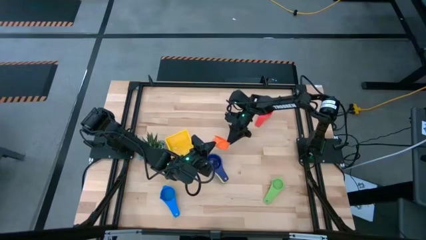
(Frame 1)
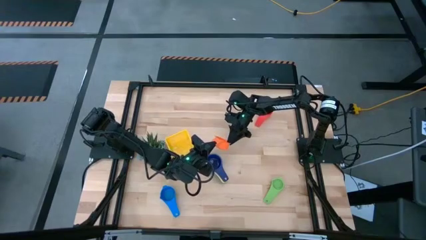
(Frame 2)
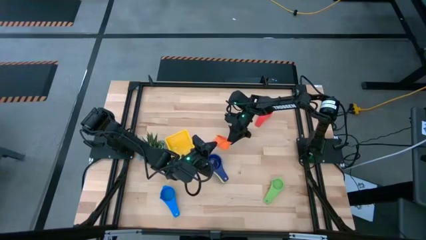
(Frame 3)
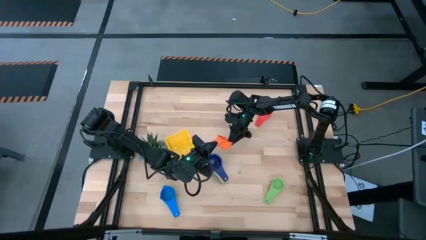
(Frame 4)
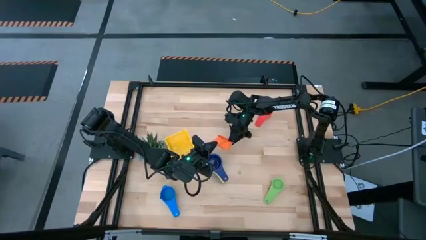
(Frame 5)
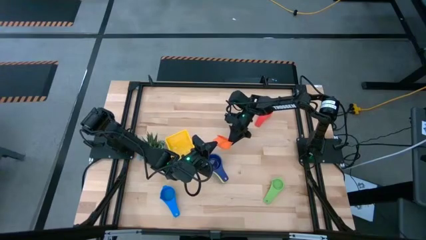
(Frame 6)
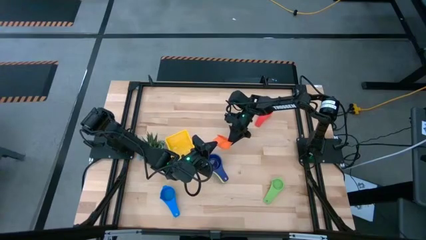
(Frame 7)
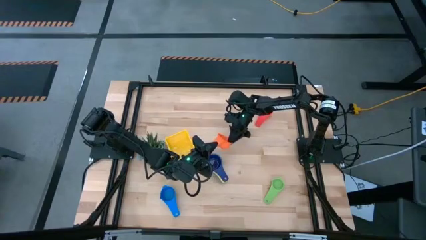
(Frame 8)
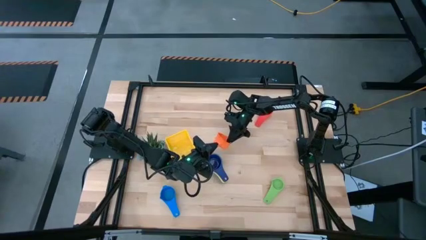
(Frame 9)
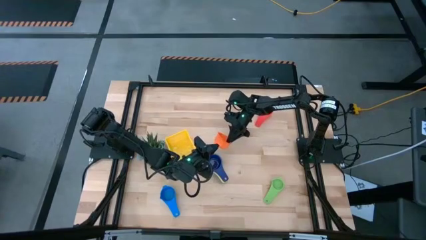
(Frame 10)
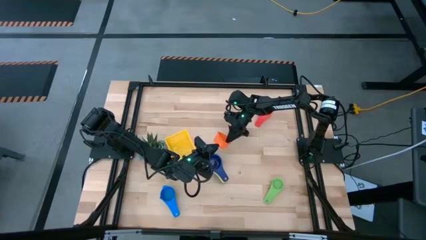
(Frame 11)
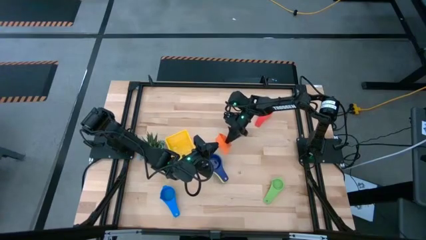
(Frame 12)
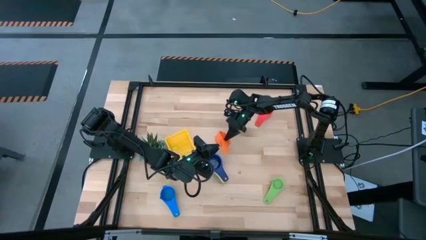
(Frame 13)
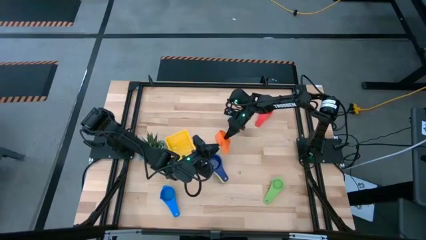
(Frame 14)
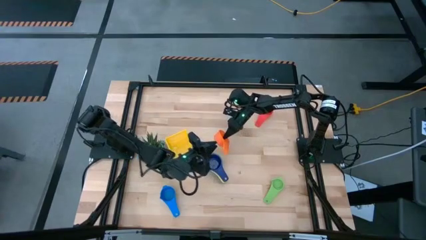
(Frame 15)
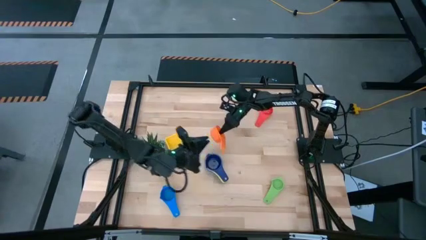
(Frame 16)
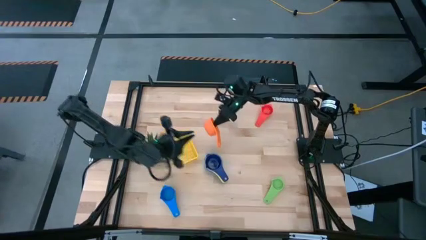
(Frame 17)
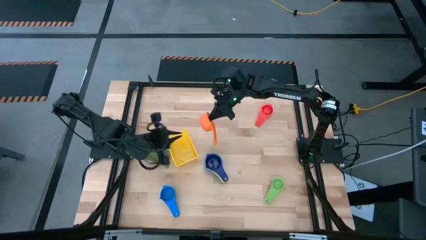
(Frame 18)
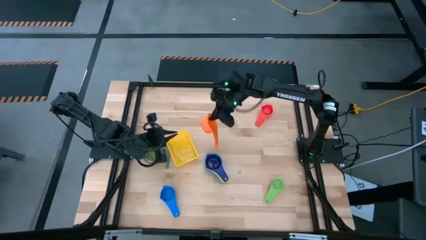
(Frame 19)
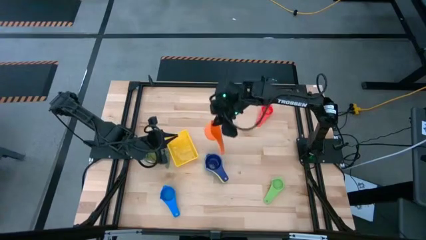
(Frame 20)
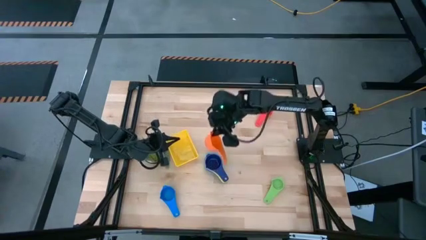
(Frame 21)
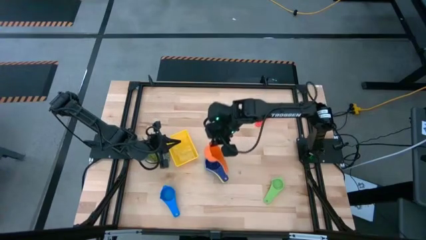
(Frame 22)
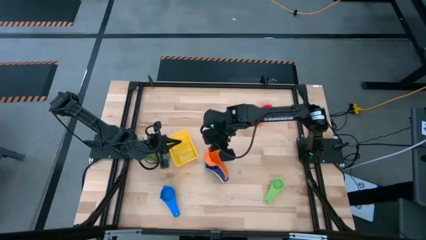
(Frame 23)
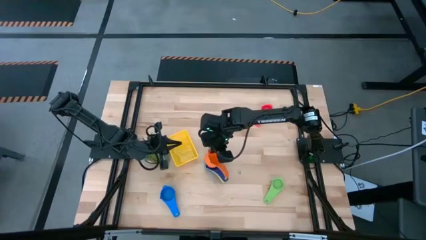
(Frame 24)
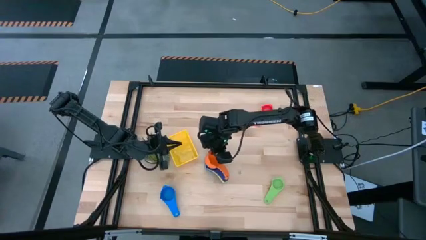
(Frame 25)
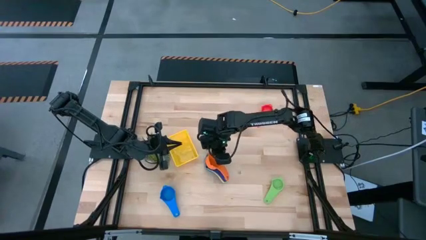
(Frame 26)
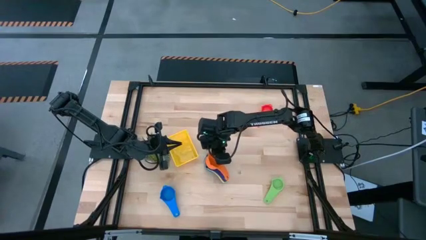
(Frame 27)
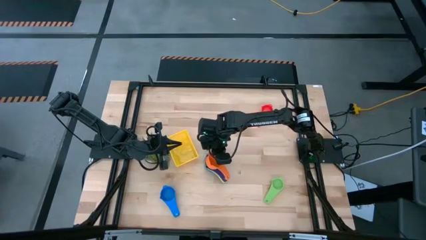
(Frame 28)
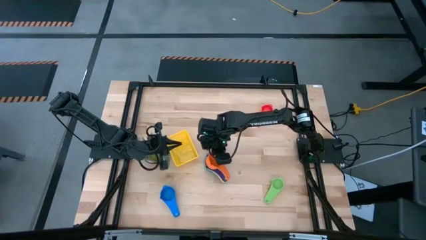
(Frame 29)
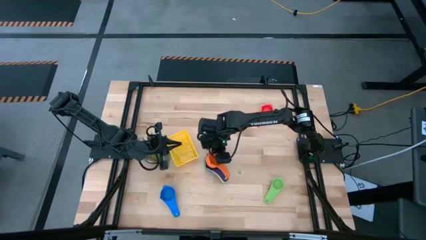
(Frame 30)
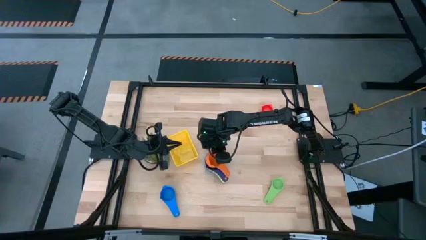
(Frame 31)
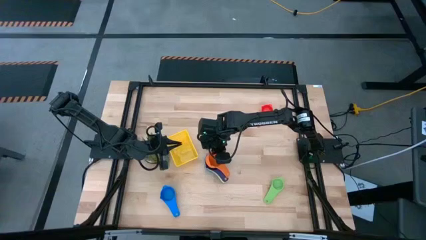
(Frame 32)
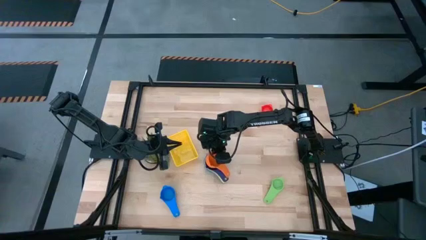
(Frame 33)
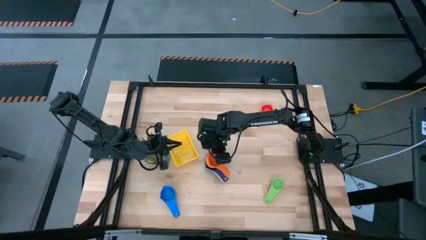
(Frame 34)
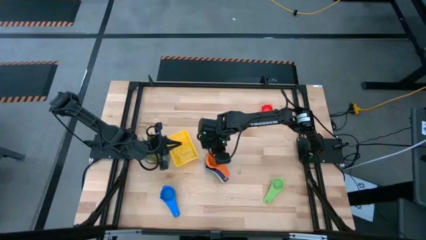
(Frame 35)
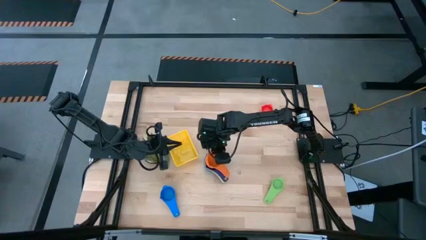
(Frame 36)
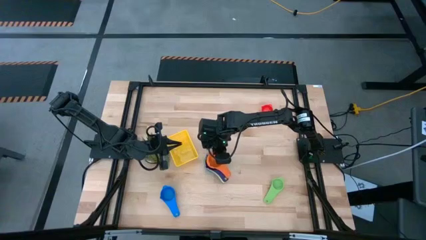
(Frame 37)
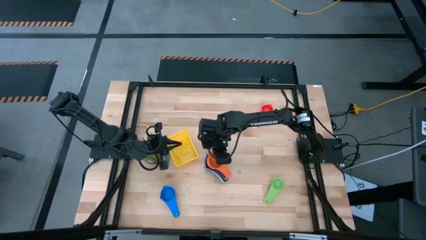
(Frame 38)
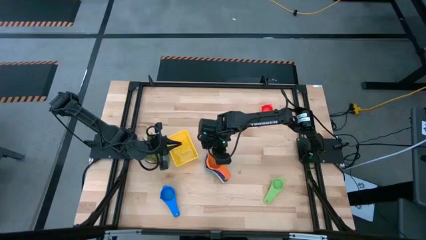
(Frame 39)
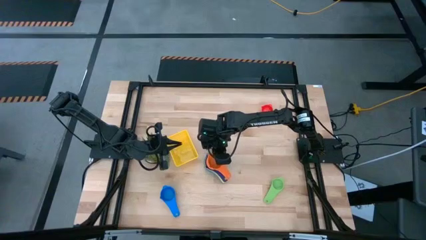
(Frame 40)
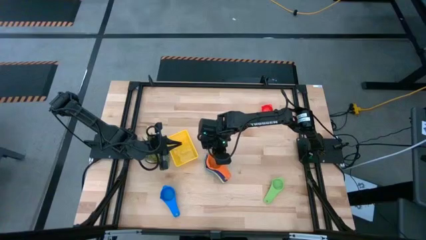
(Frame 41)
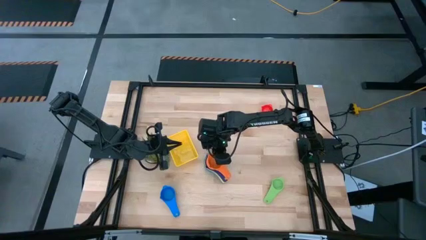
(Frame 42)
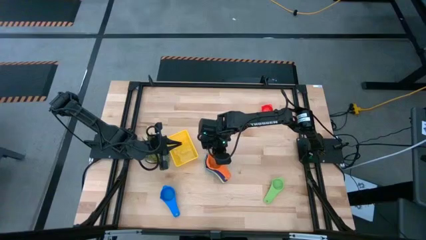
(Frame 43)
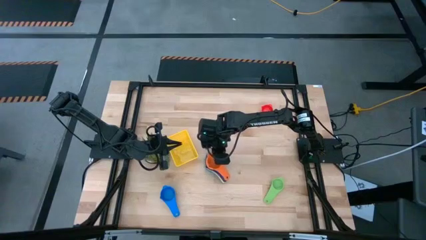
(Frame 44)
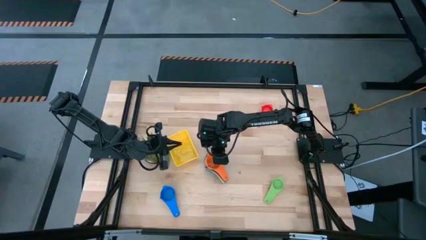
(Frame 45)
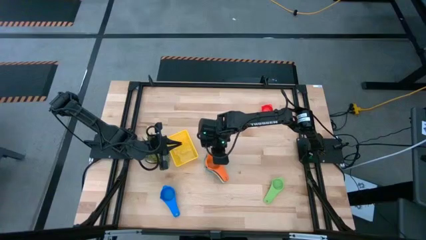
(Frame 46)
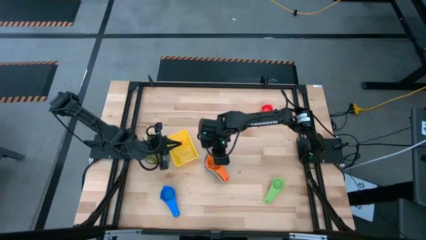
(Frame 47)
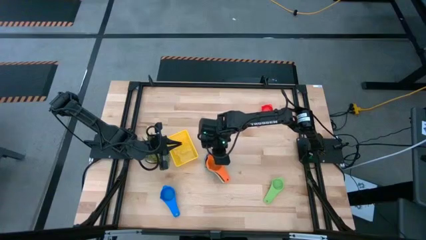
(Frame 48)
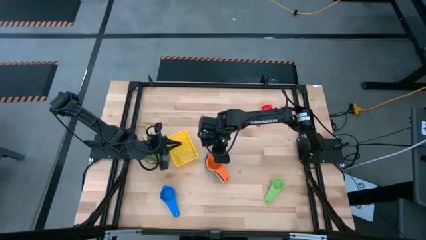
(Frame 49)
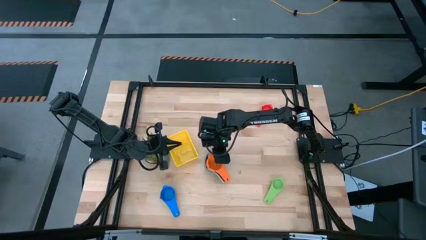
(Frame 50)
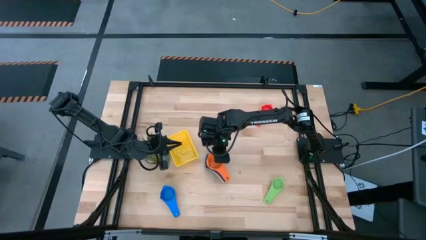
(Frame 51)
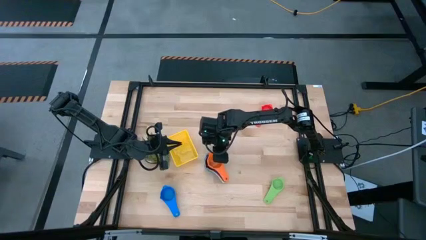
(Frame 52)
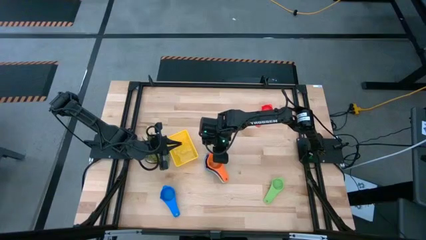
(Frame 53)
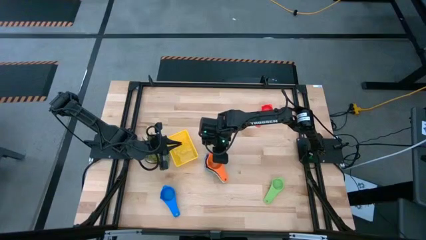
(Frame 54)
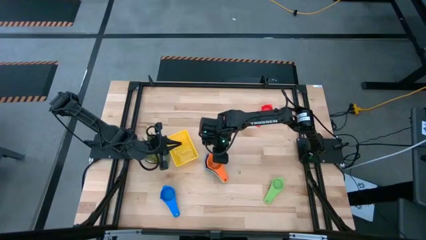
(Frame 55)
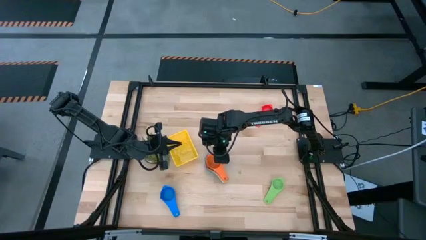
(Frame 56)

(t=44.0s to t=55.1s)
Task: Nest measuring cups in basket
Stack the orange measuring cup on top of the dark blue measuring cup

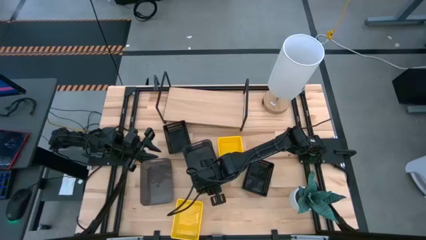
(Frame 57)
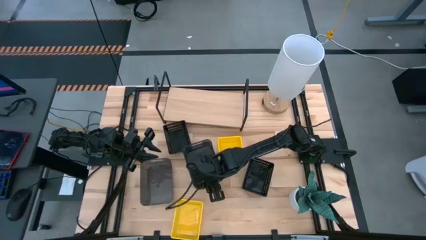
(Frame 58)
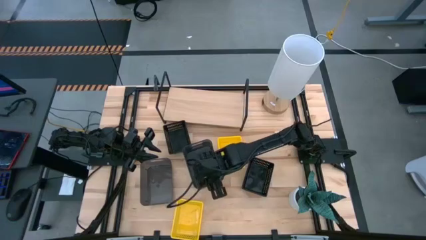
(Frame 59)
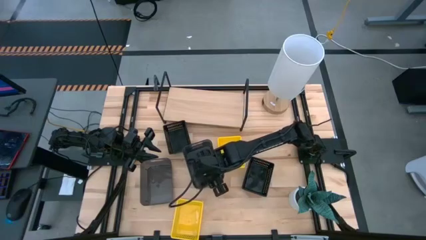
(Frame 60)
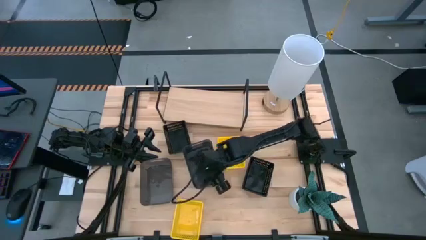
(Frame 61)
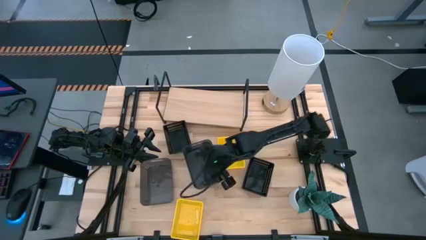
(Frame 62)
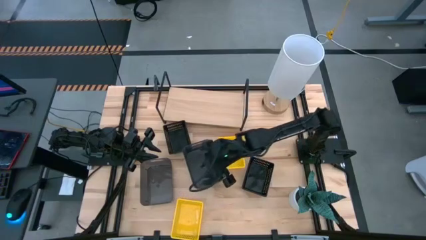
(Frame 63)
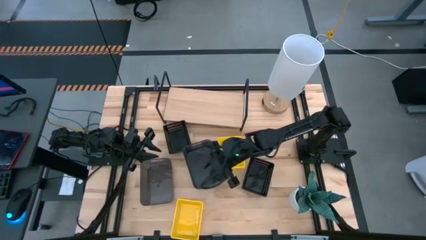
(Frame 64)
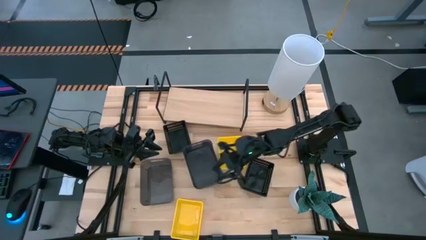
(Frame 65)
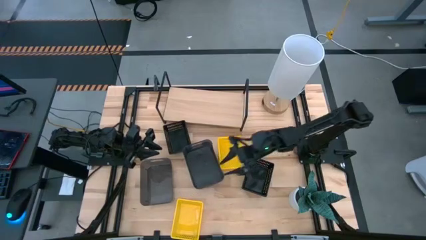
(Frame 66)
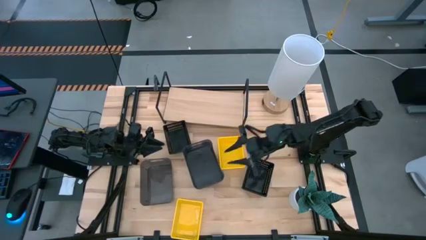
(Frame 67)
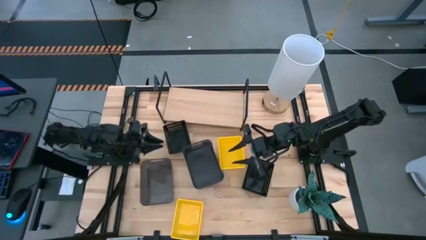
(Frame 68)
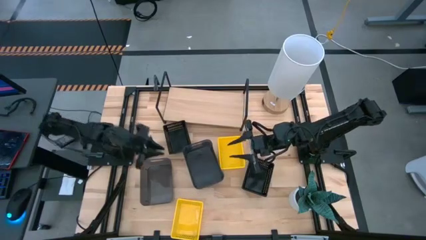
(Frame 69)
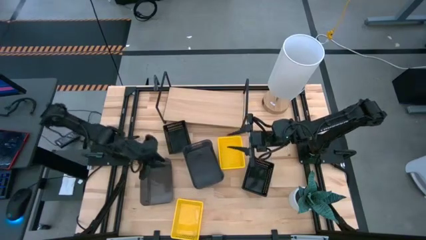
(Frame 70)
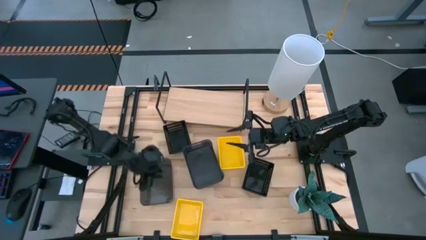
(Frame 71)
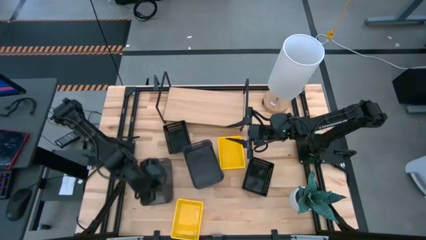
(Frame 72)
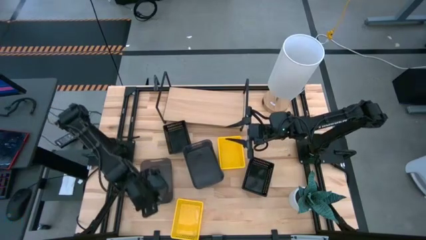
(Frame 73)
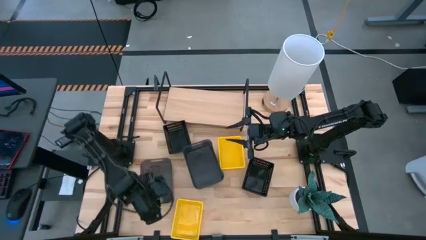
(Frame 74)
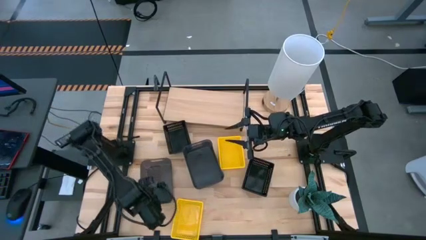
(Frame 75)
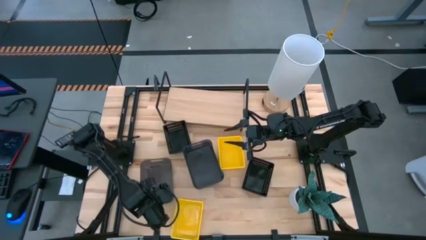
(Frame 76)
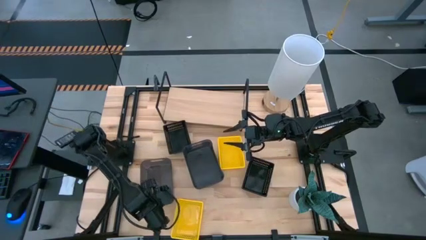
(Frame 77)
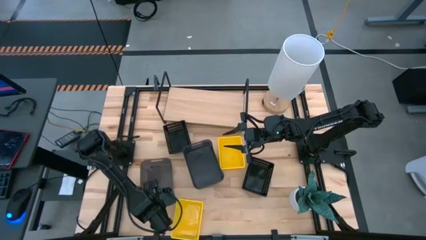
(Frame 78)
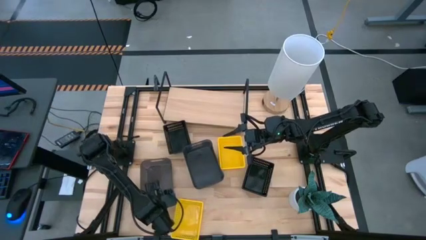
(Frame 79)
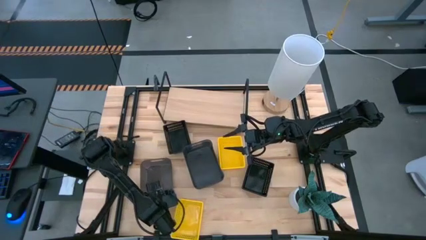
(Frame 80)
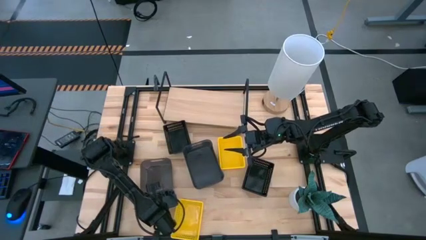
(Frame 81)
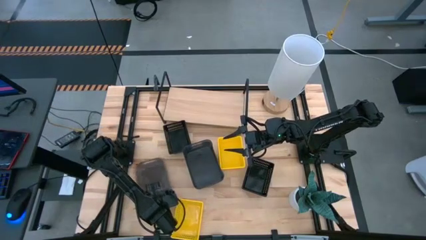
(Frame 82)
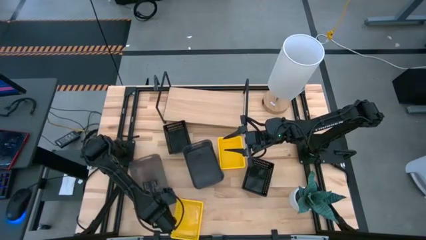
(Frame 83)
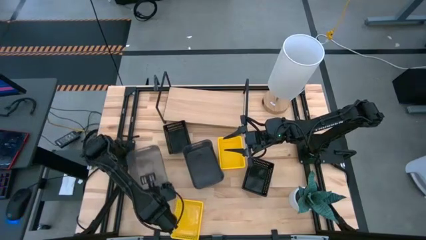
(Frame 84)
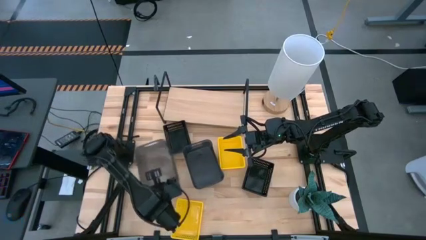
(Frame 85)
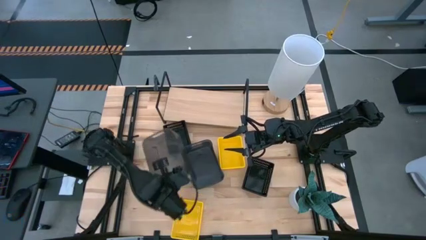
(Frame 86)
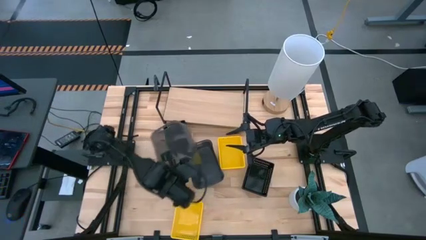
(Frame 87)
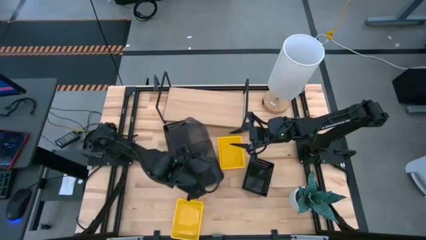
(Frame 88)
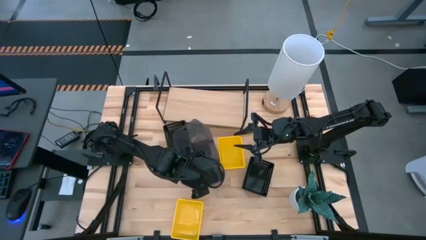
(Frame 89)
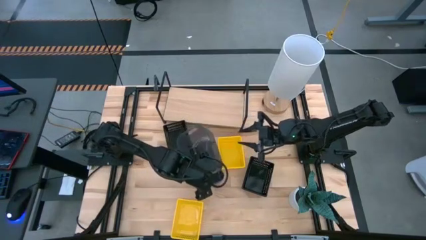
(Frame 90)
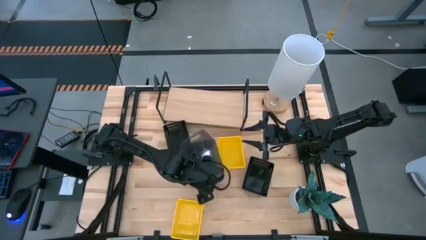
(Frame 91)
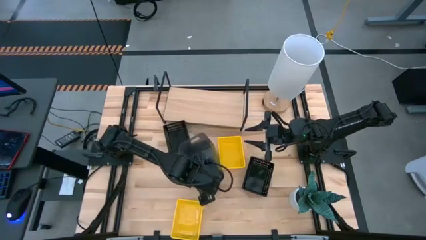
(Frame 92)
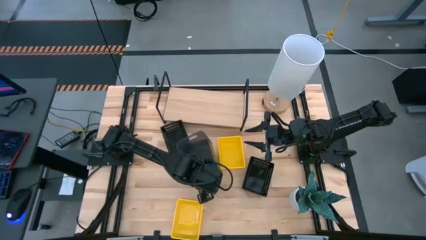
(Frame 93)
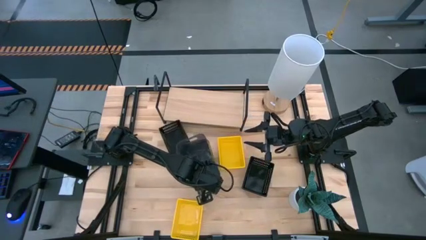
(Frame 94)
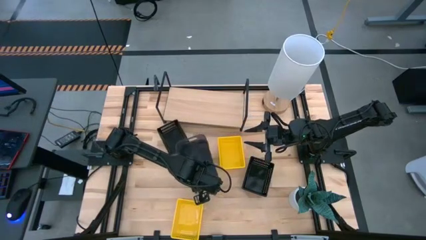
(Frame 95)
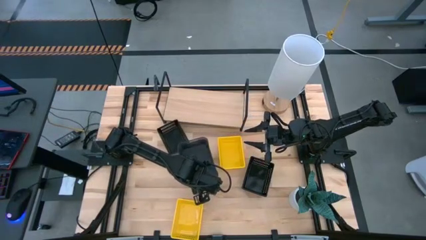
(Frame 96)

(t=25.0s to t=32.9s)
Task: Stack baskets on shelf by color
Stack the left gray bin on top of the right gray bin
